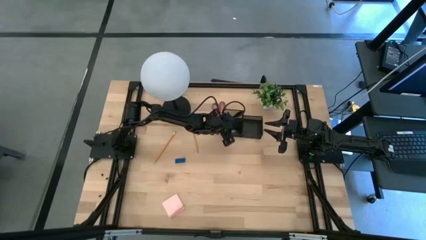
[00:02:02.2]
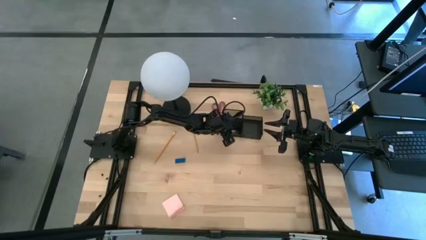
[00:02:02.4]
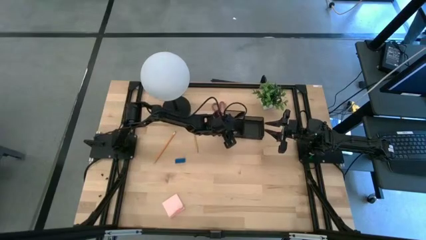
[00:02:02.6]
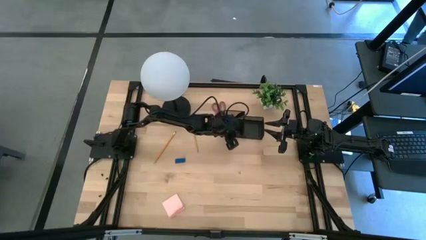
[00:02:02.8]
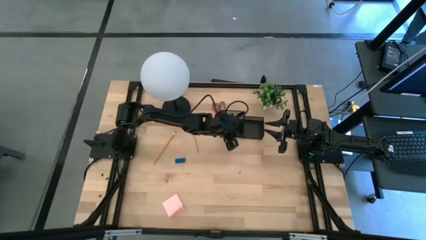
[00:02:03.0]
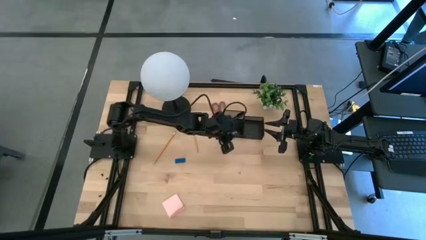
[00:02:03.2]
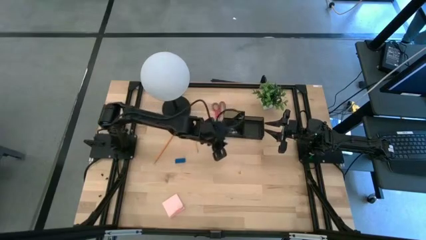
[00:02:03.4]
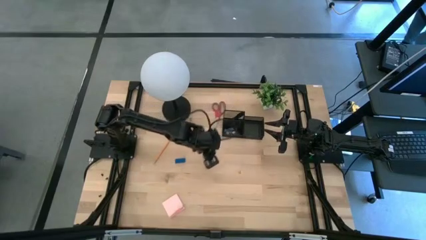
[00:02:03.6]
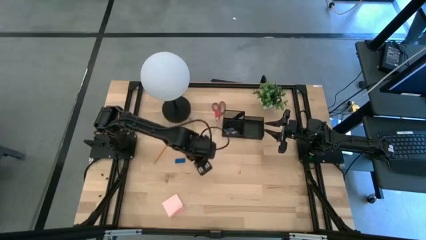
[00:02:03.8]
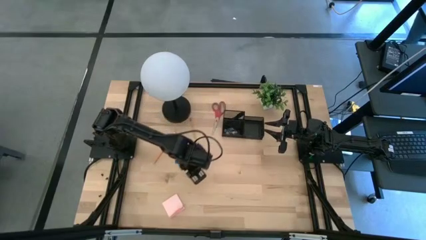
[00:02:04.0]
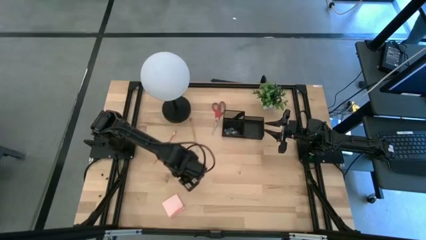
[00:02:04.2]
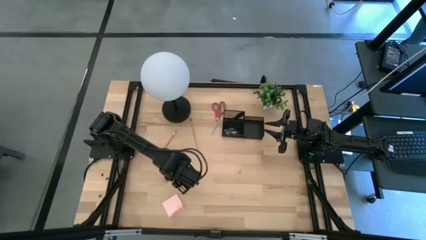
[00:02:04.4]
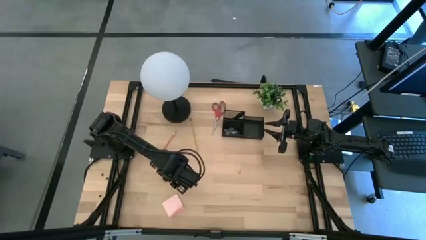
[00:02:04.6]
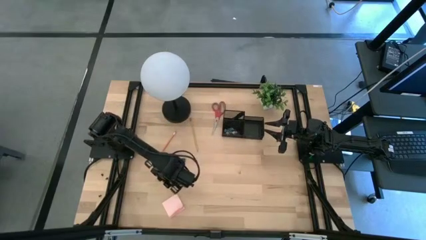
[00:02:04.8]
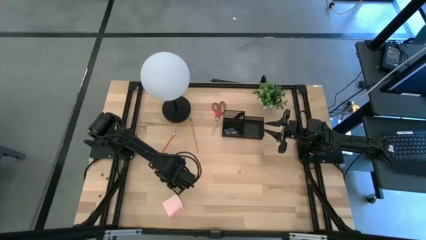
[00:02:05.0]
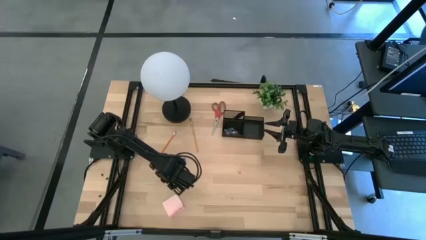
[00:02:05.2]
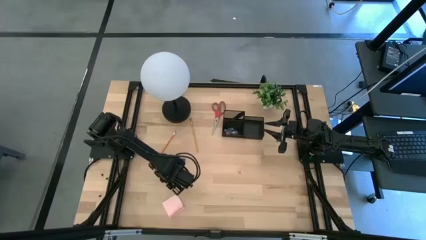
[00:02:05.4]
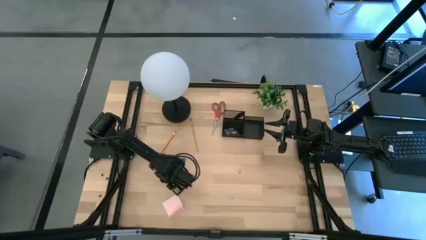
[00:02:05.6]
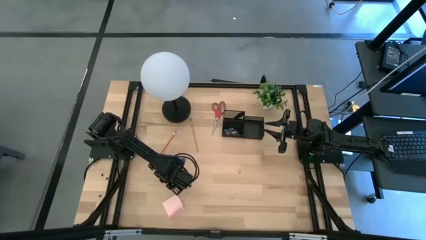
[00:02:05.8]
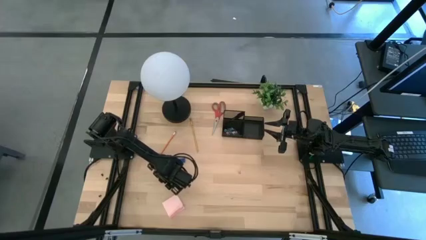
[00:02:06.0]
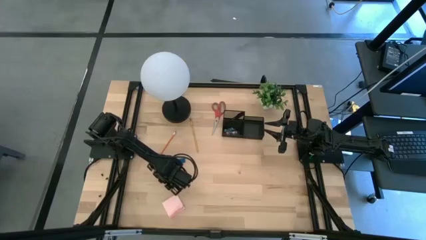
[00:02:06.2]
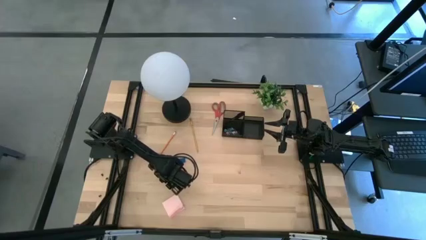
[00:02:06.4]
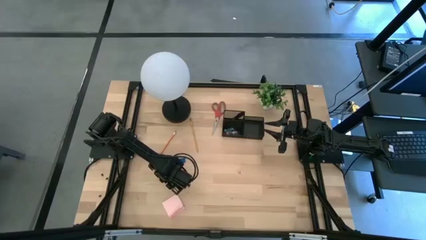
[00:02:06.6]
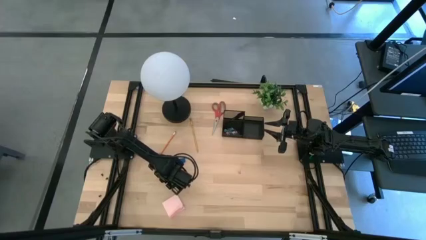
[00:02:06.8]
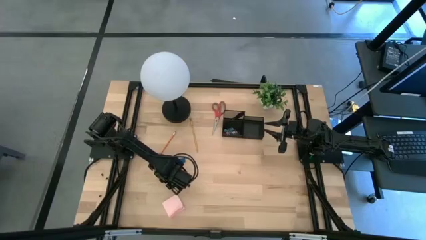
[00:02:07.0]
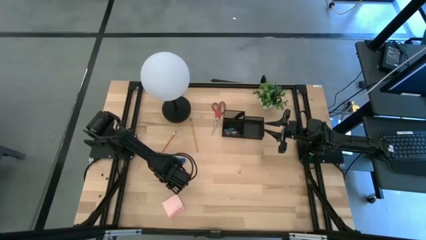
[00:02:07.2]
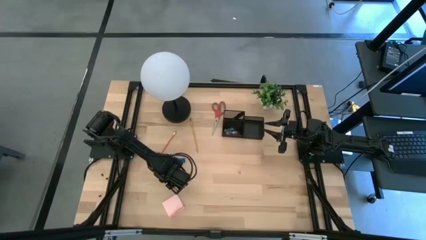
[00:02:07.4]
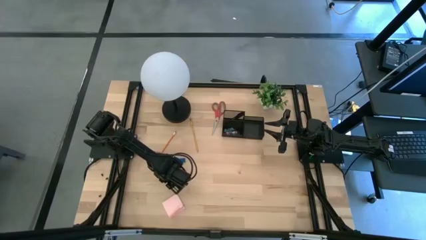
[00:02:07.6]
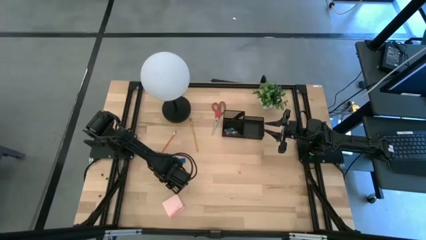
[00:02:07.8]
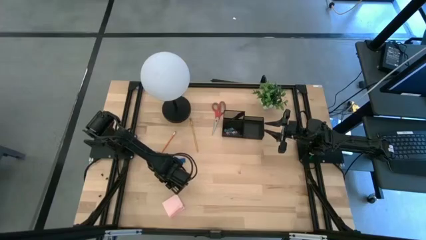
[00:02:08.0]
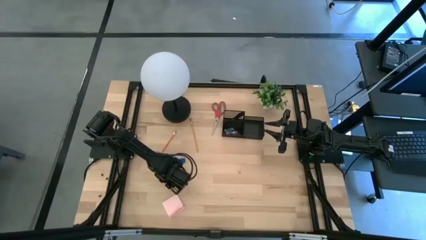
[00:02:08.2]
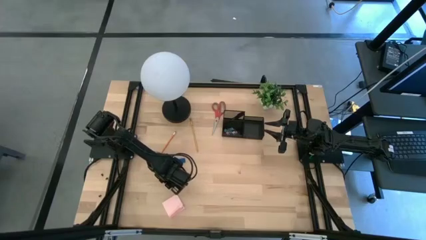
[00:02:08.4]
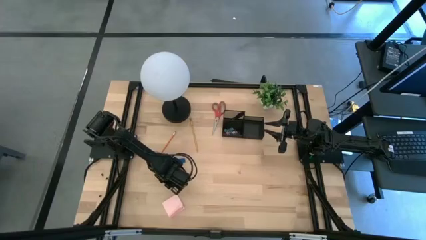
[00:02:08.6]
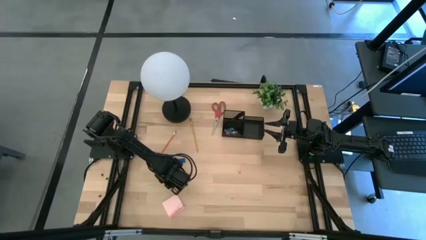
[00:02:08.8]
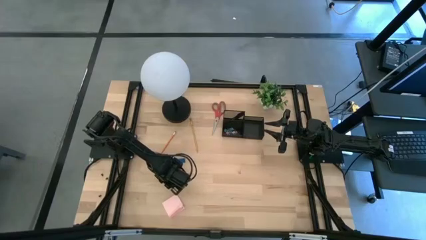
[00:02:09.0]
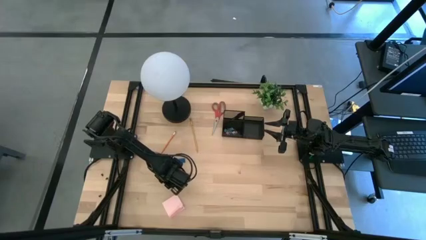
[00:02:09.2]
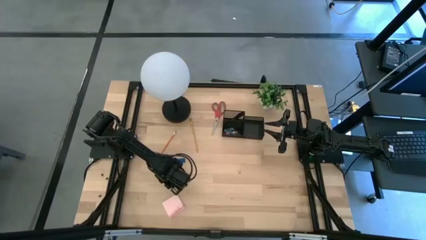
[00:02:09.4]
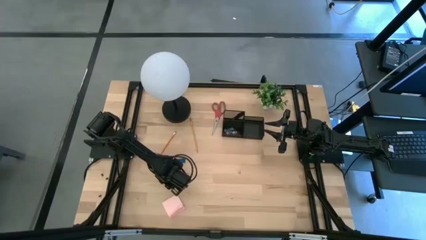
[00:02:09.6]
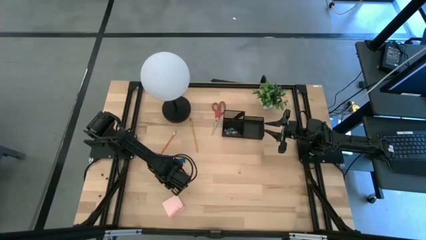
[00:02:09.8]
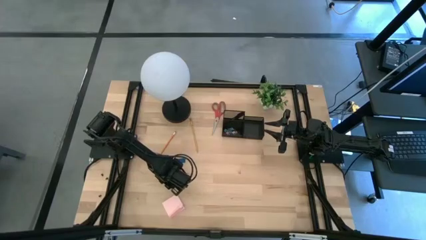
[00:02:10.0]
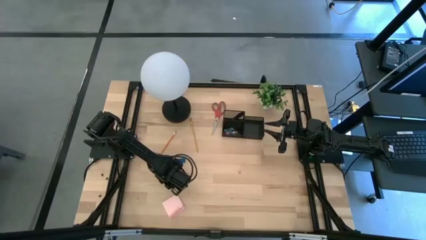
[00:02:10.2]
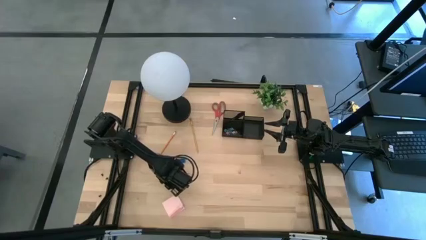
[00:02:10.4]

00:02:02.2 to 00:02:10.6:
Task: Pick and place office supplies into organizer
Put the pink clip binder into the black desk organizer

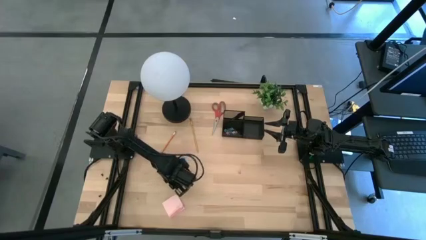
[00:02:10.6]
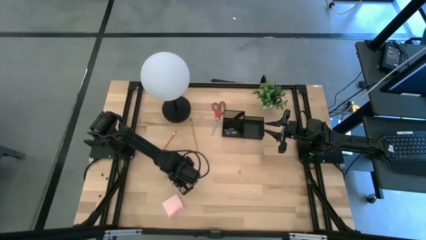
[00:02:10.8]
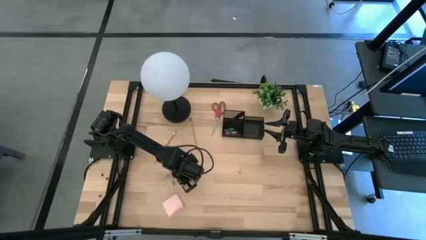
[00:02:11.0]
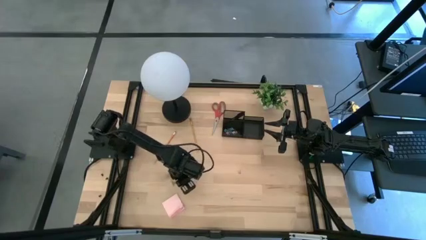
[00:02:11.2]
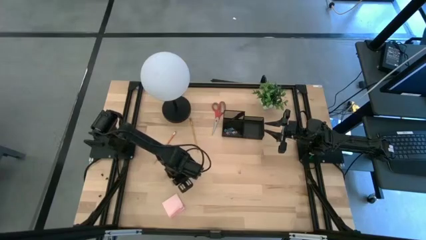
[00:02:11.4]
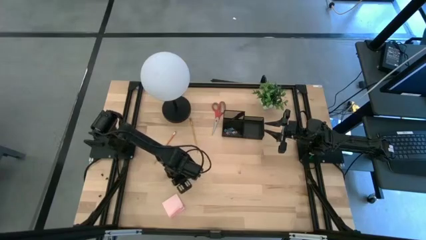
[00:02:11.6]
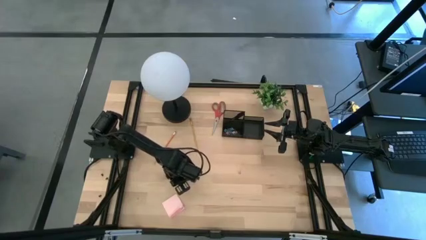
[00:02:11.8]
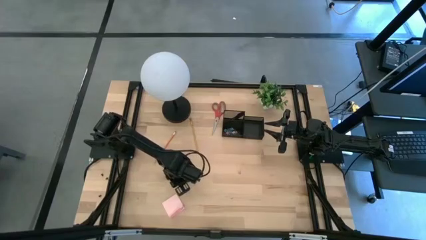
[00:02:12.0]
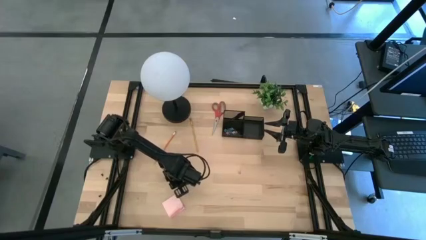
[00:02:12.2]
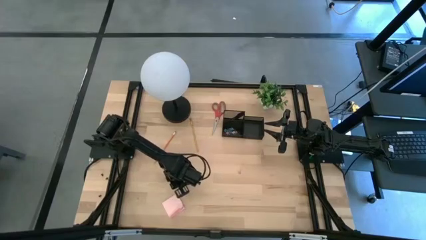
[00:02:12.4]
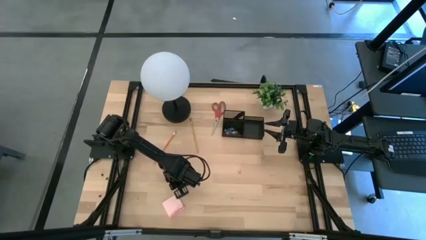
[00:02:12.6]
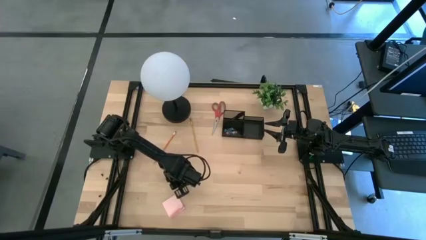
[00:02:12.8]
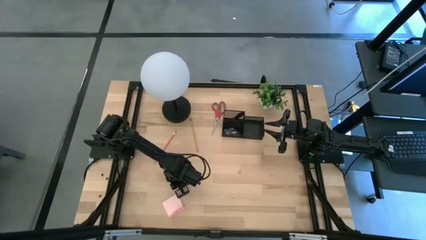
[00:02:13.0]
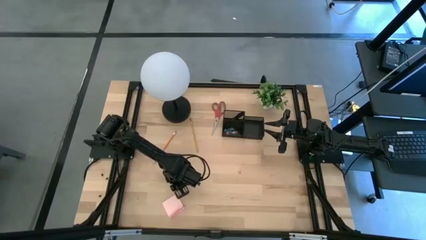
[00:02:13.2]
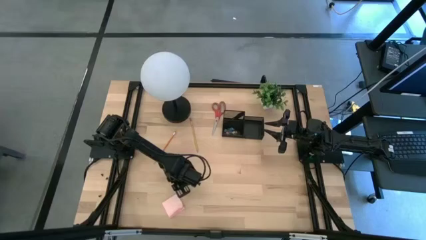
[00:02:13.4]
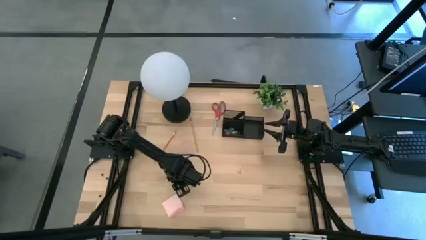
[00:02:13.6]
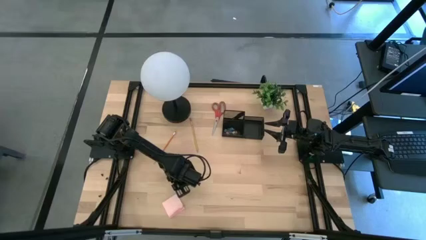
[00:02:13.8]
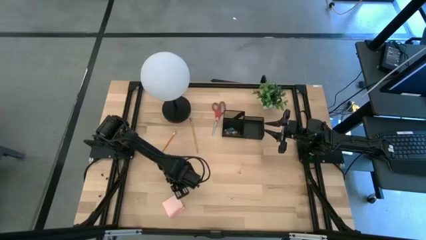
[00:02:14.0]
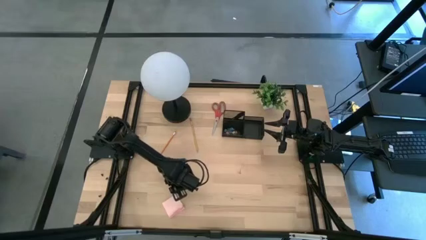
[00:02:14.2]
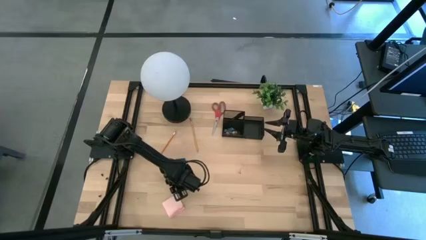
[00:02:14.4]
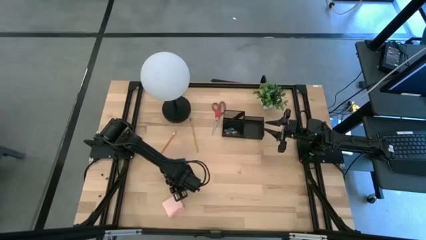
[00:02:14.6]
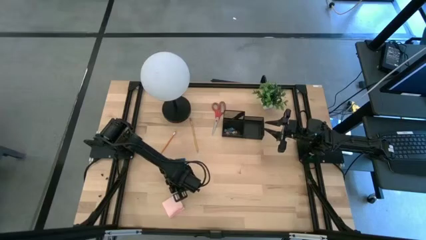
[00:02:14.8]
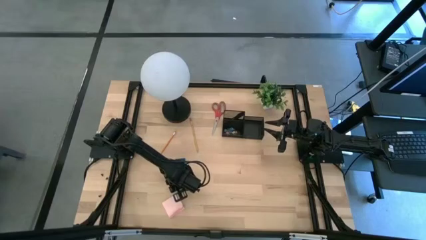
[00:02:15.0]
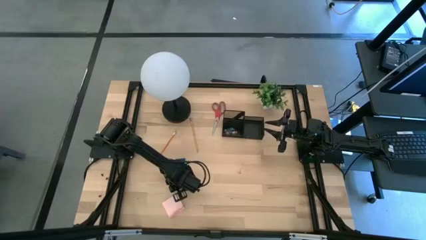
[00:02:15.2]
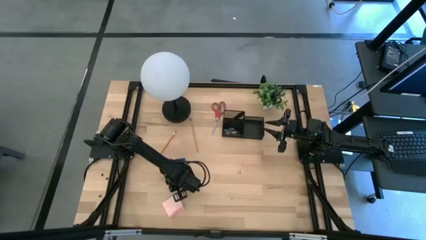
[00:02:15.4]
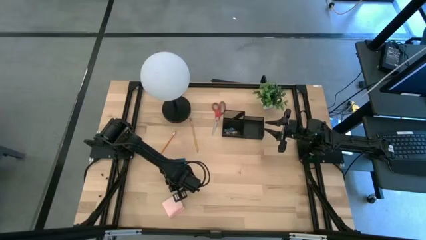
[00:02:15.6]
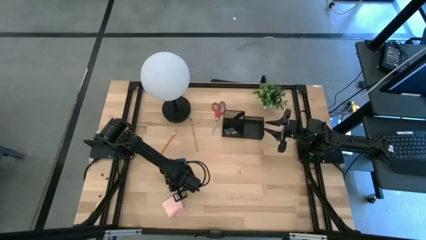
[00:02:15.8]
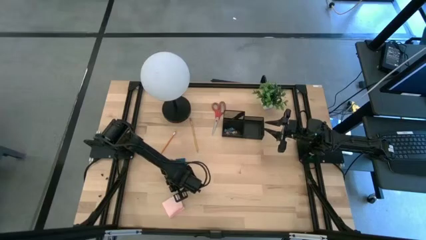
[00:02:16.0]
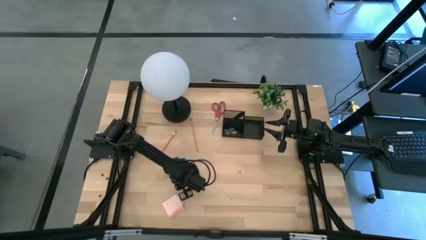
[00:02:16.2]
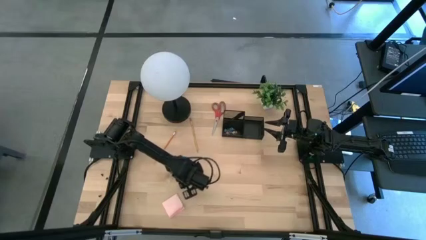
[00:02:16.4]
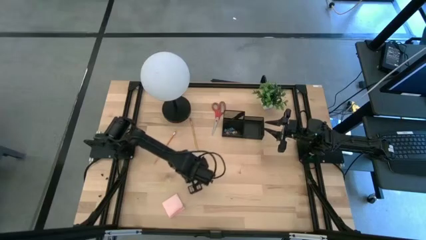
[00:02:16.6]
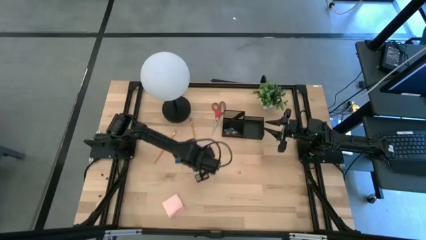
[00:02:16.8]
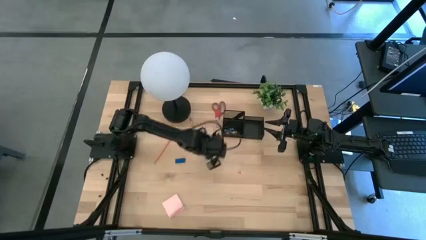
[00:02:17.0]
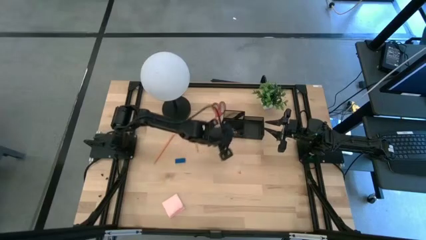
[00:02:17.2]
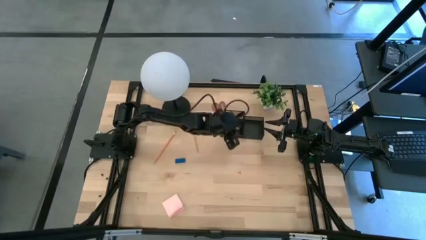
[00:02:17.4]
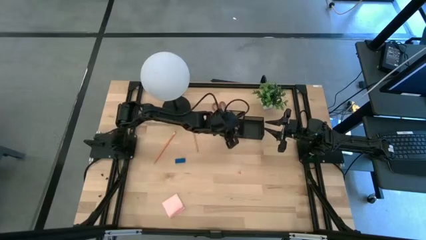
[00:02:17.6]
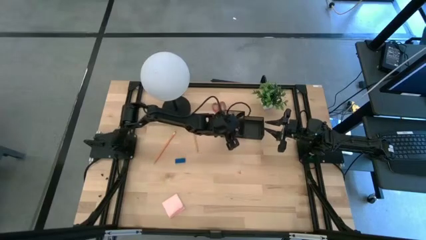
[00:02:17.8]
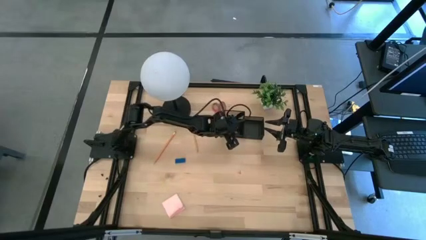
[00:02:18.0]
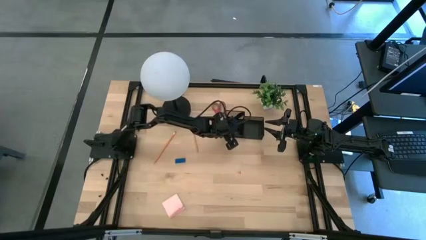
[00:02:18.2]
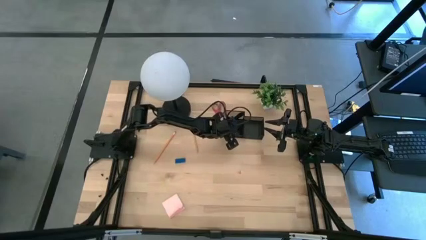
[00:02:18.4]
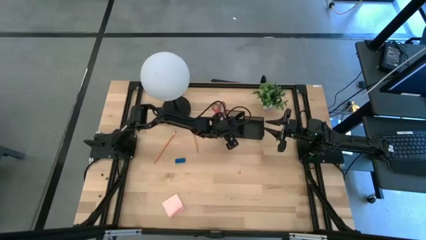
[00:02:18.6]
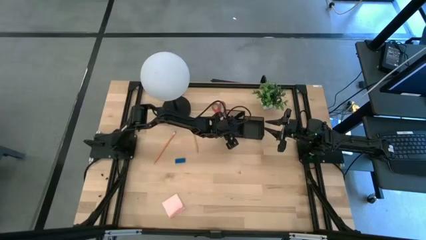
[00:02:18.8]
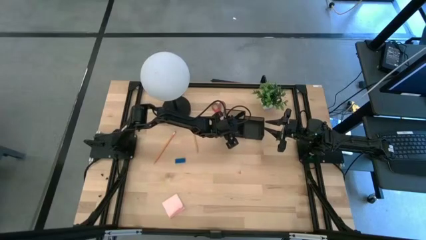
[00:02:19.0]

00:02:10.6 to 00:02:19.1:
Put the pink clip binder into the black desk organizer
